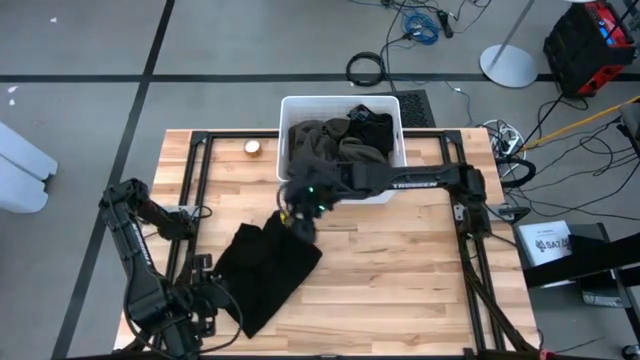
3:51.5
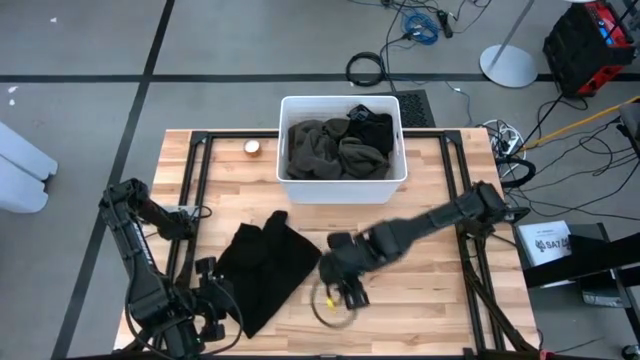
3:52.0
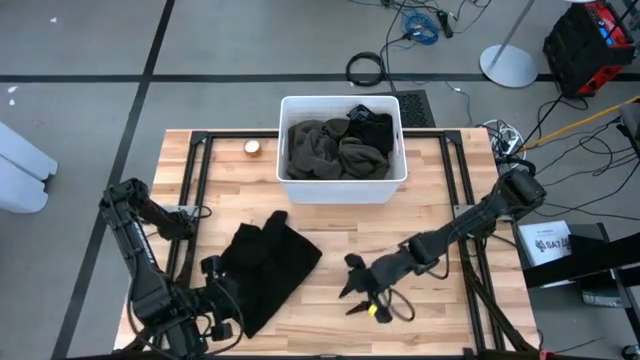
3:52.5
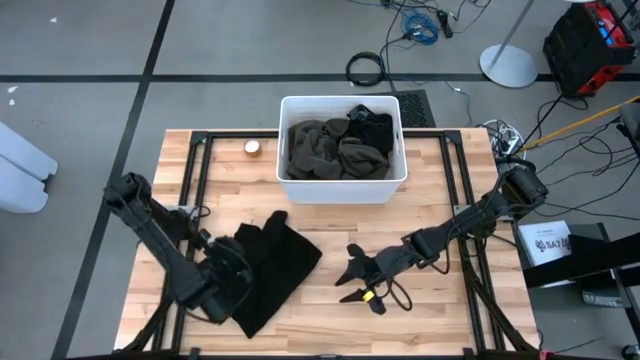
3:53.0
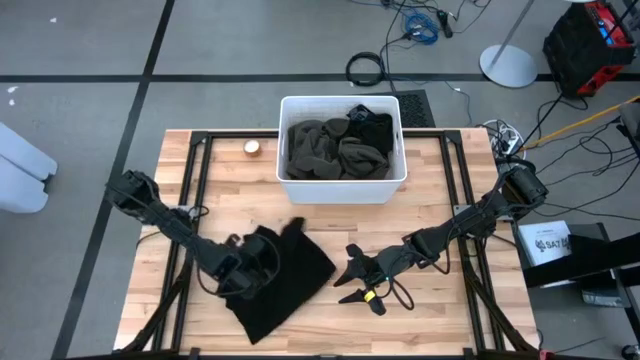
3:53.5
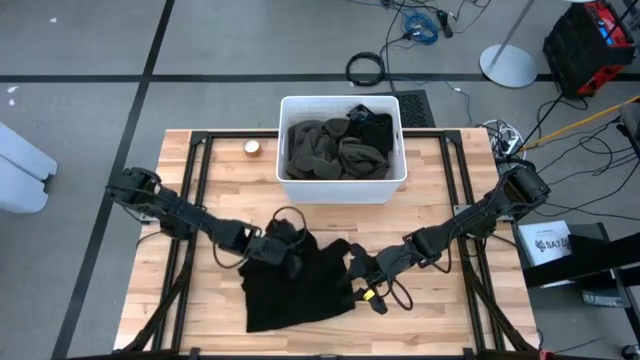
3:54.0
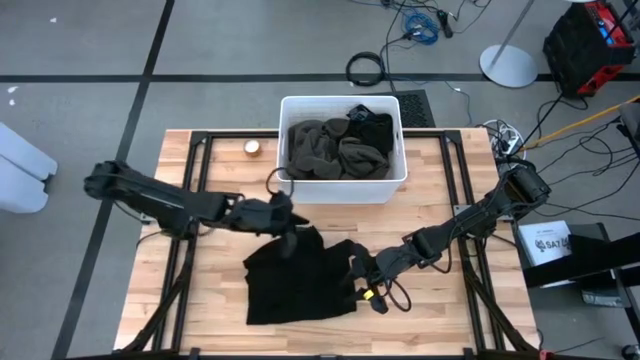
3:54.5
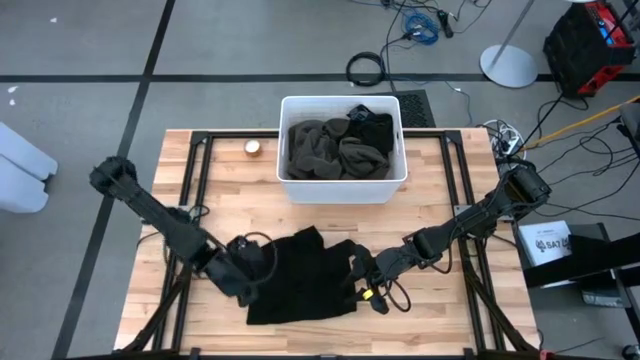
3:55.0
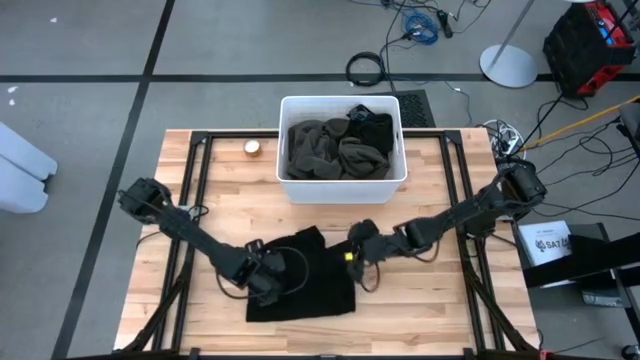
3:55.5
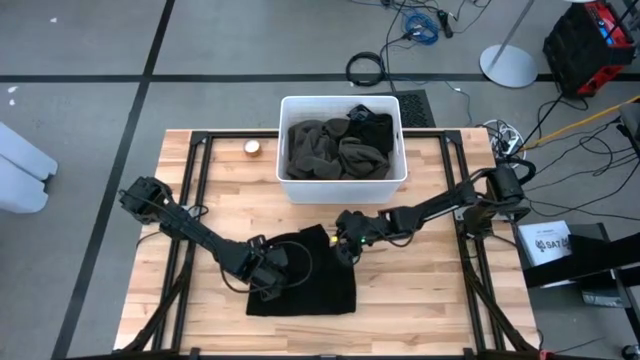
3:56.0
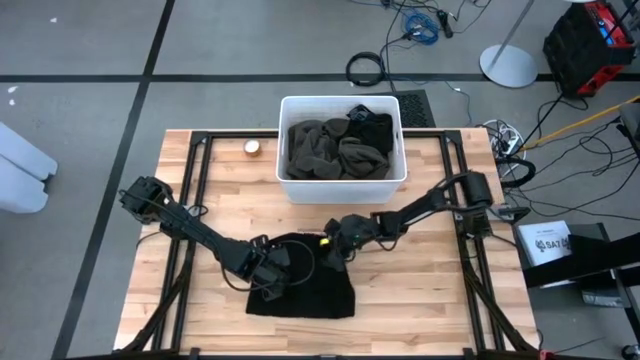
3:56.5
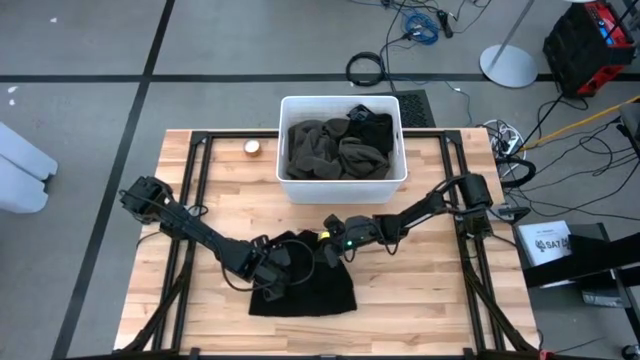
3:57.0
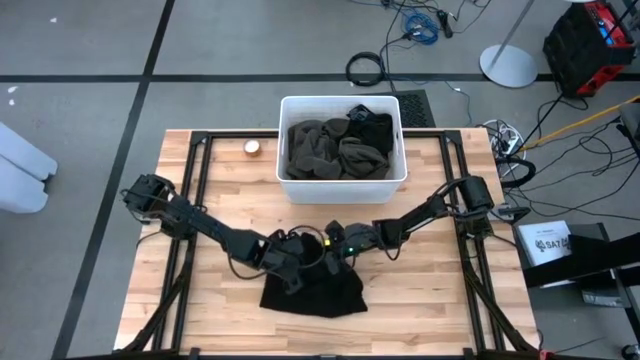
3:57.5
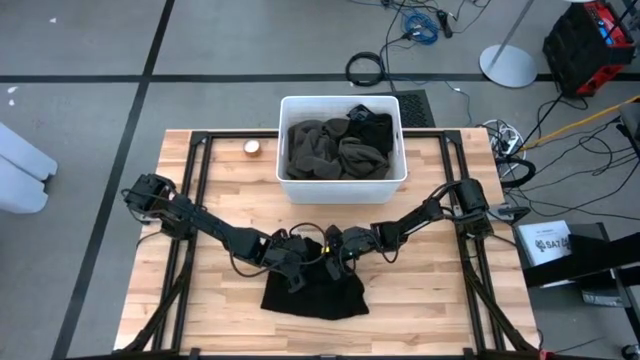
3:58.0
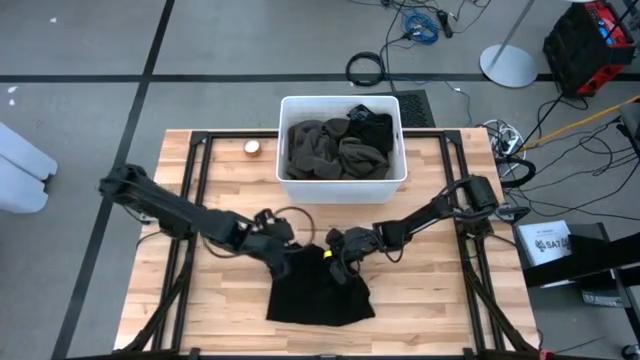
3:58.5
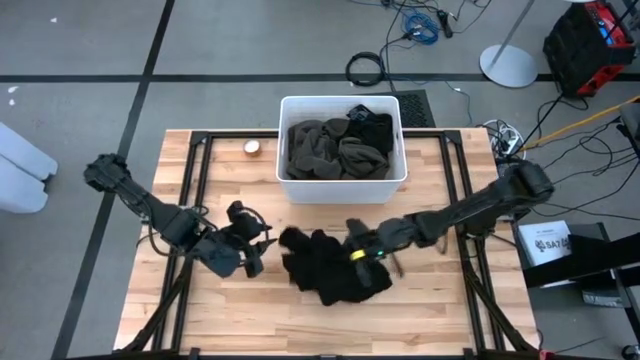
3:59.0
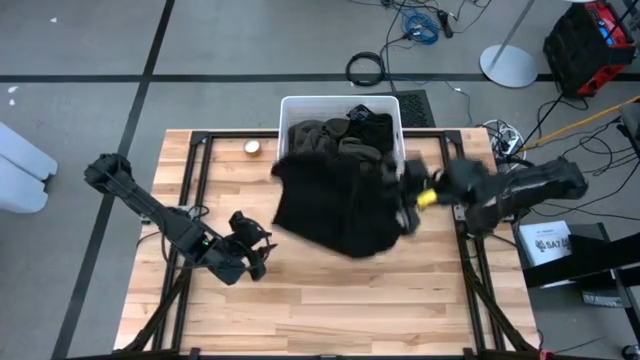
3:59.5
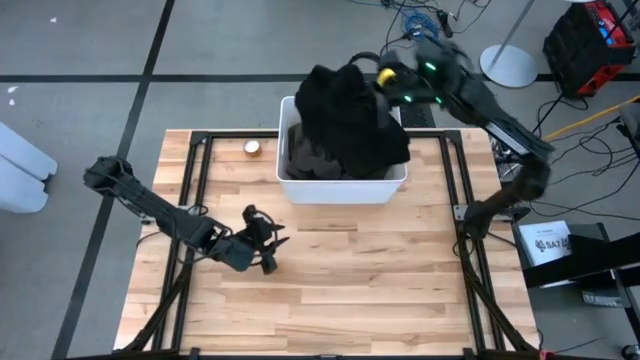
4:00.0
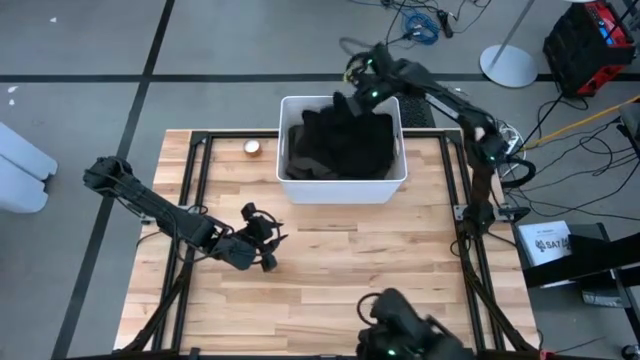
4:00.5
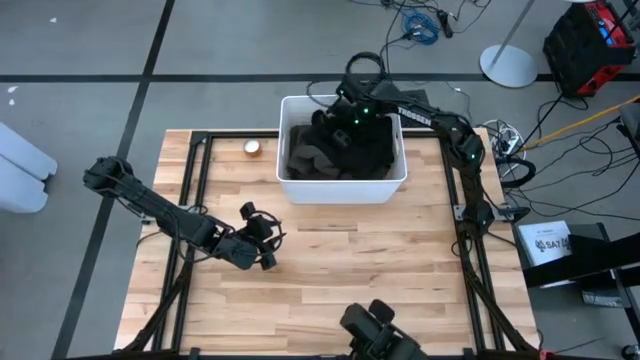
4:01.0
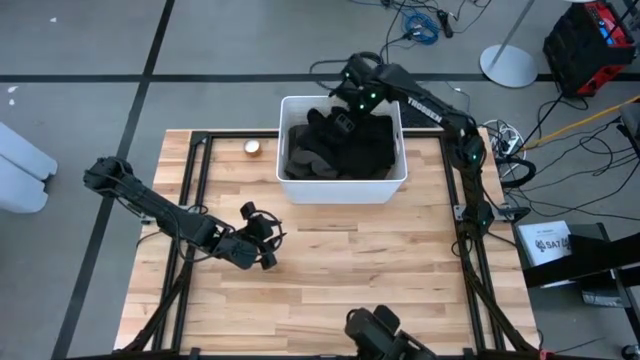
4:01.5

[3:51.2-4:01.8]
Task: Fold laundry
Put the folded black shirt into the white laundry bin

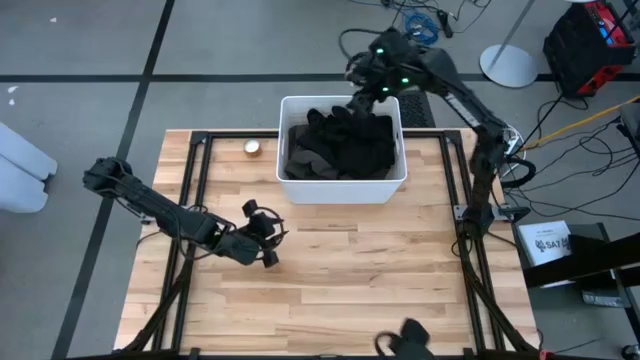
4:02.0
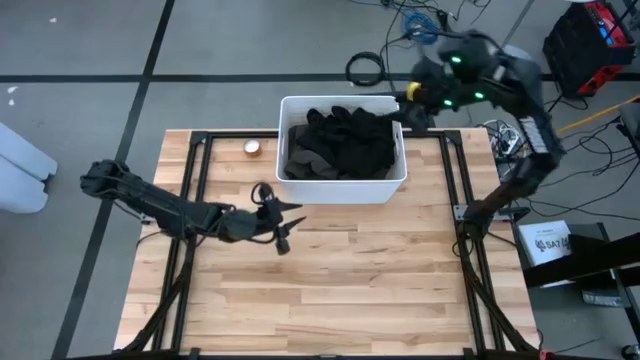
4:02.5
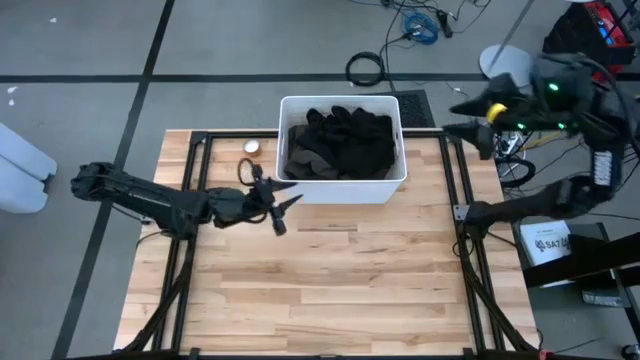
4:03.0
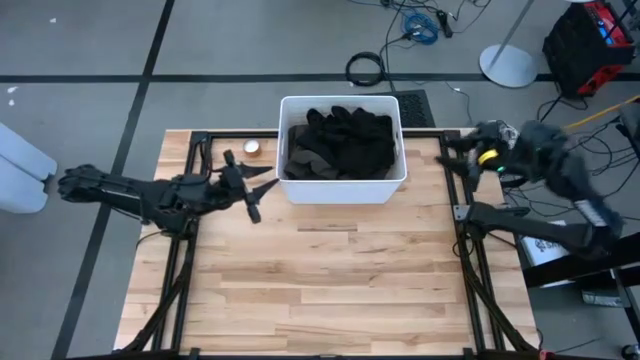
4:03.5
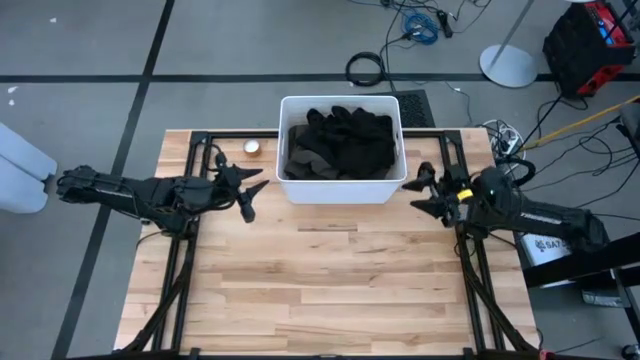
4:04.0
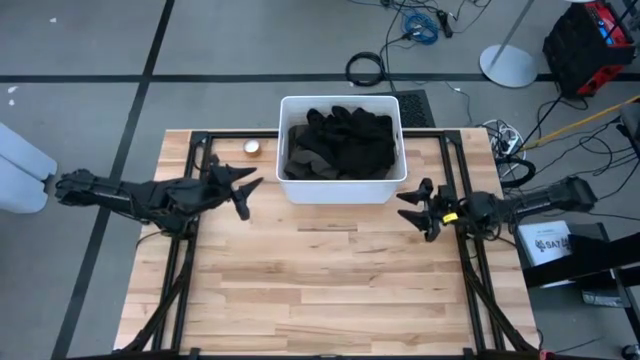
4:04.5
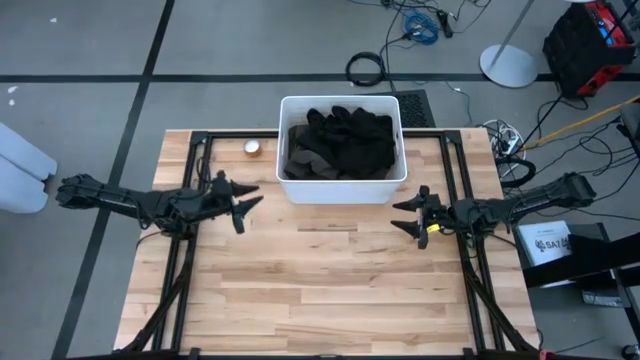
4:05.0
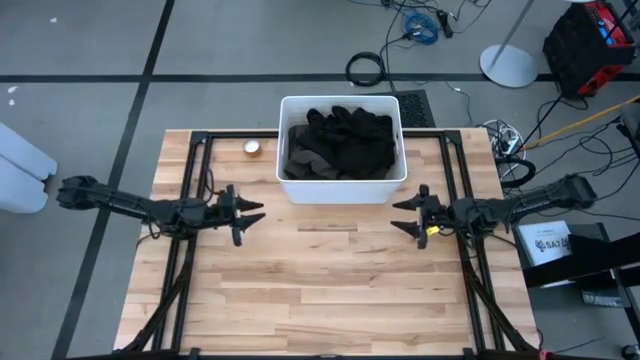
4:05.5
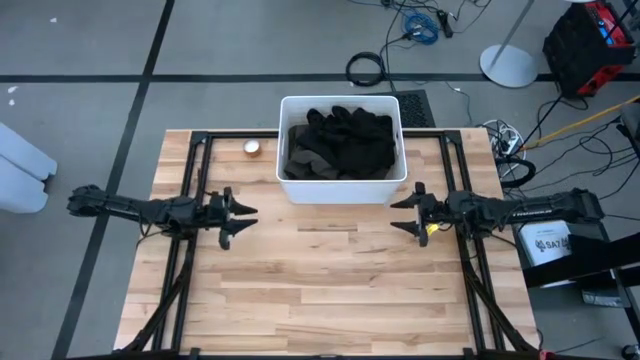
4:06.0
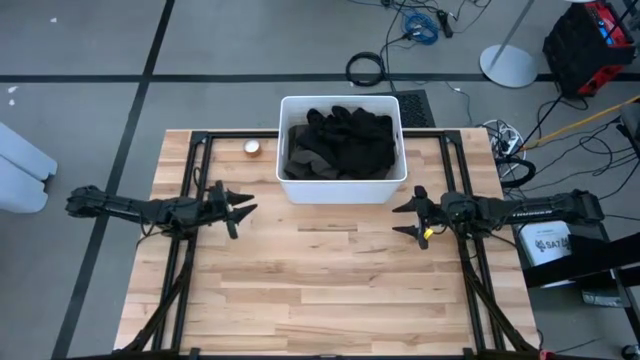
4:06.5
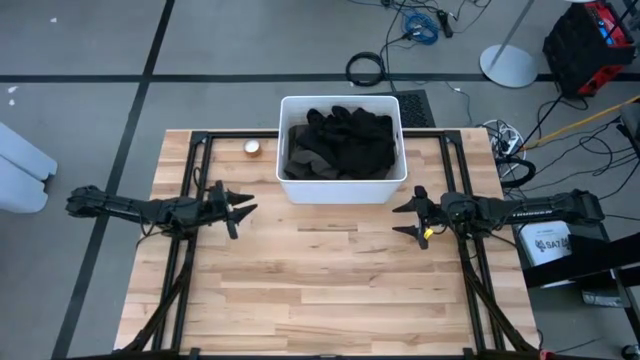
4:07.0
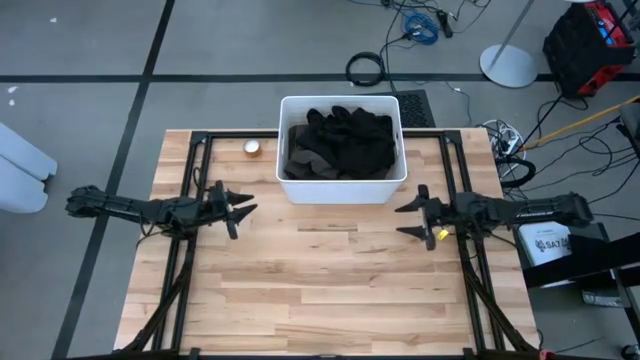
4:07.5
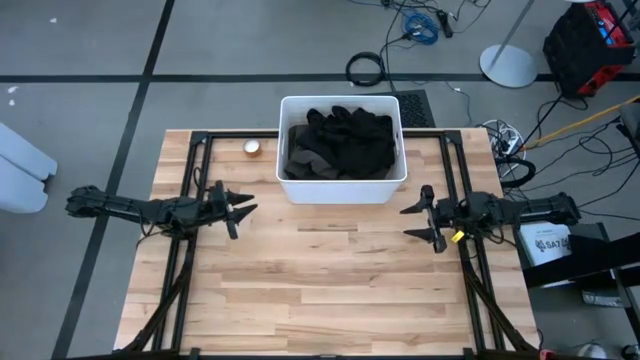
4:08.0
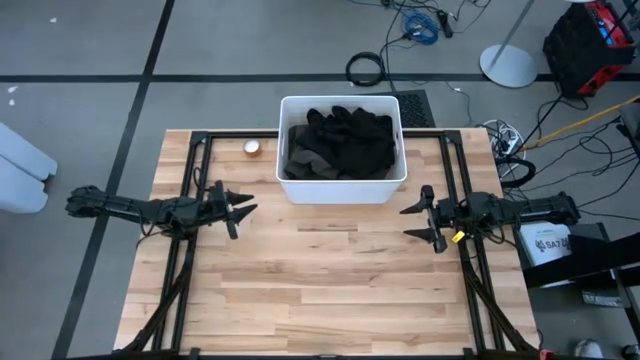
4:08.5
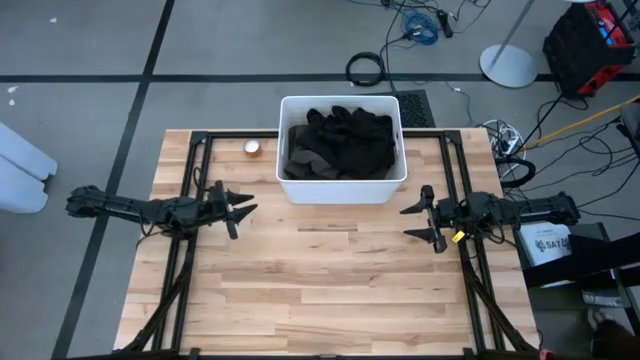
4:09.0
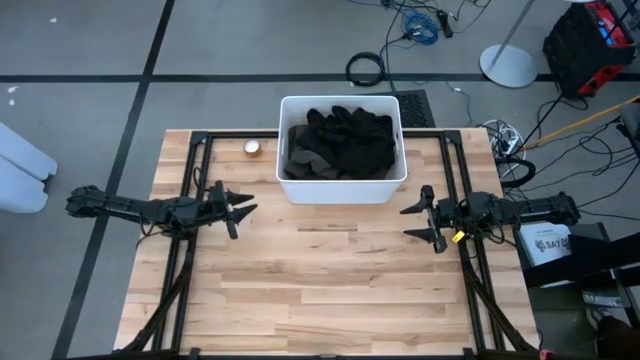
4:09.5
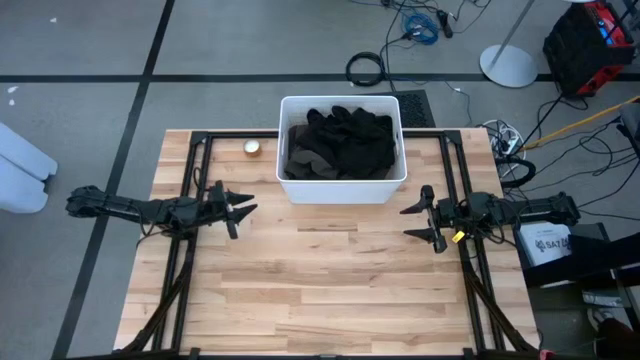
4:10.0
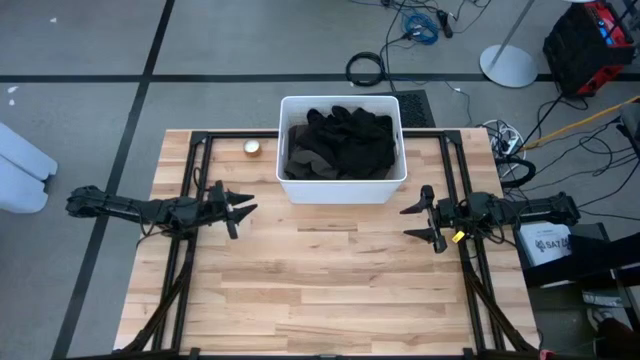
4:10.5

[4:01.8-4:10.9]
Return to Home Position

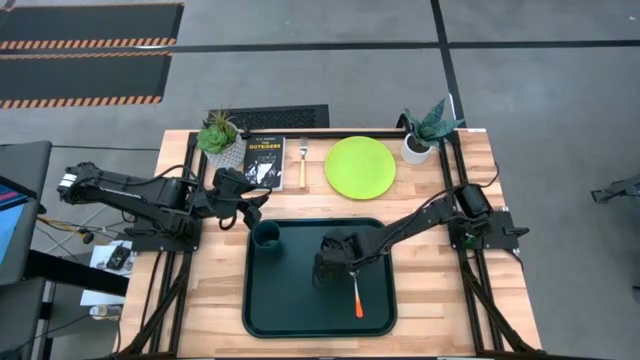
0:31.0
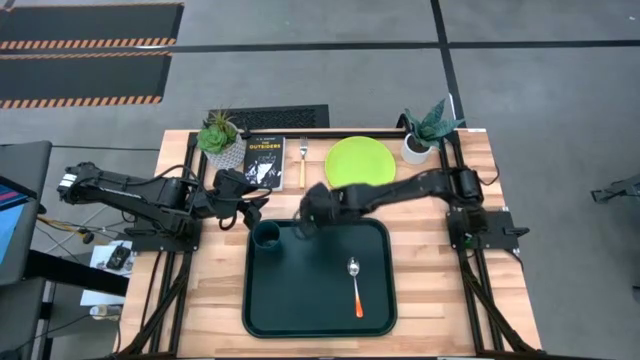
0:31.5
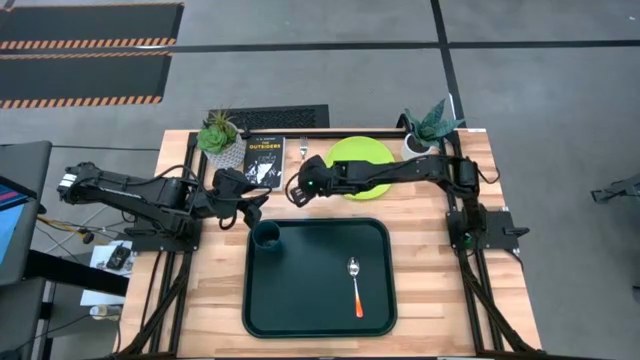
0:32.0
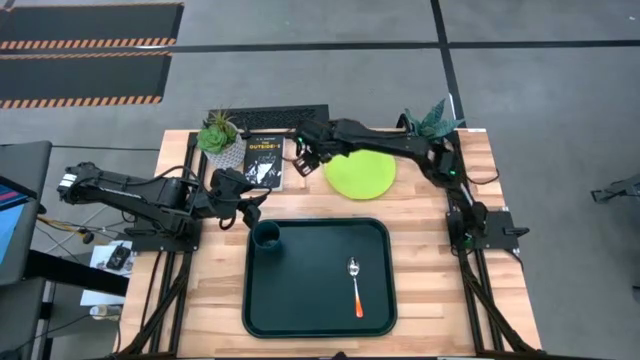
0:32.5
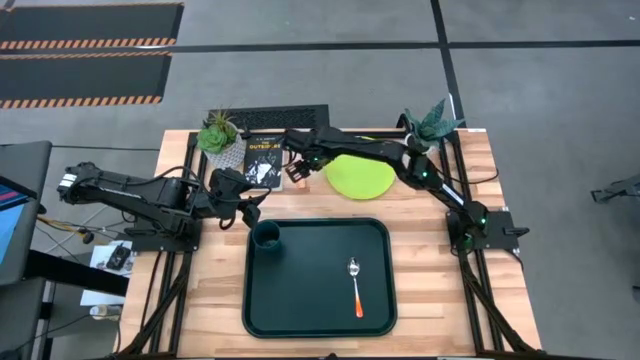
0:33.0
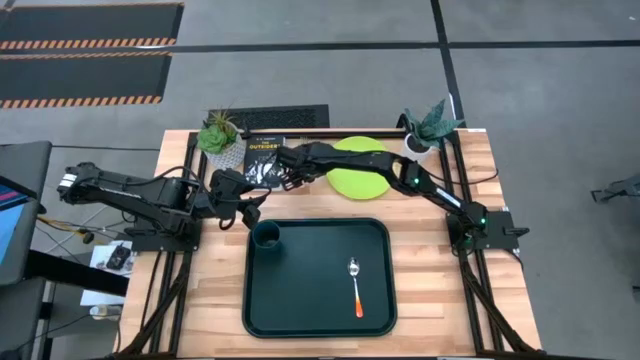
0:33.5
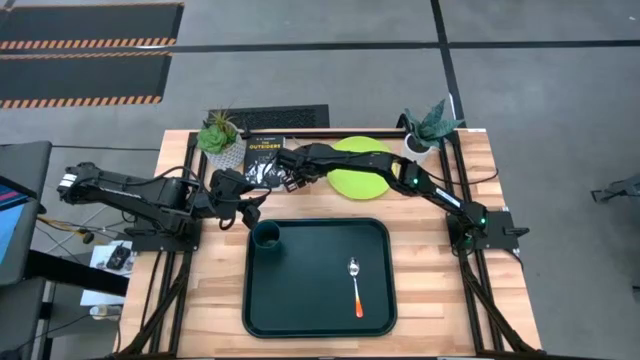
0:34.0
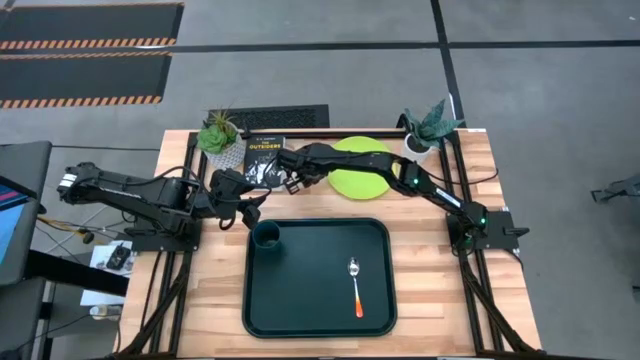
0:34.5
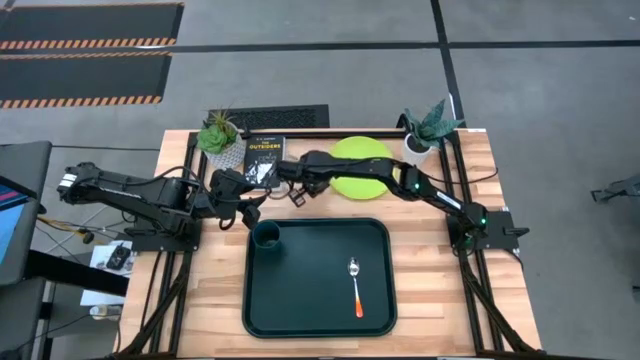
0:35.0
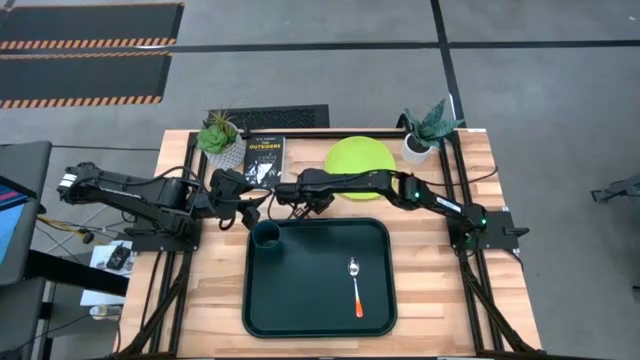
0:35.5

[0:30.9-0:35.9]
Task: Pick and place plate/cup/fork/spoon on tray
Put the fork onto the black tray
